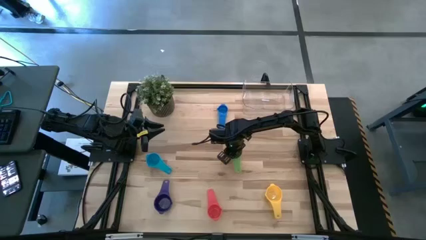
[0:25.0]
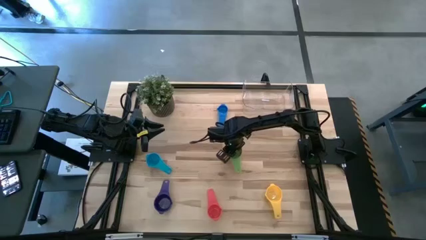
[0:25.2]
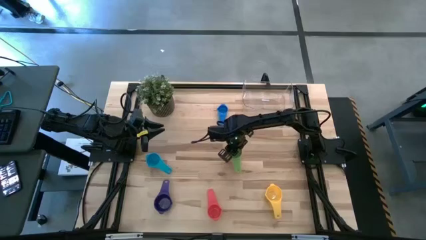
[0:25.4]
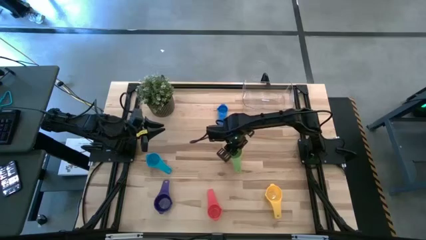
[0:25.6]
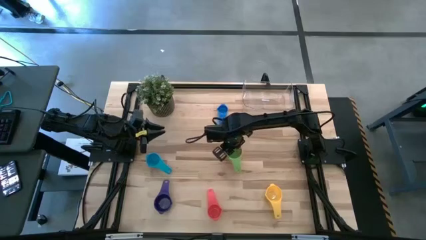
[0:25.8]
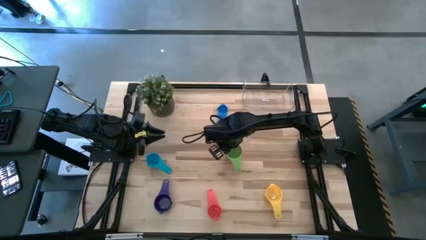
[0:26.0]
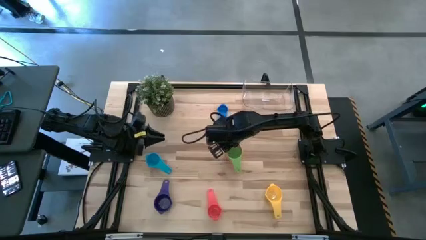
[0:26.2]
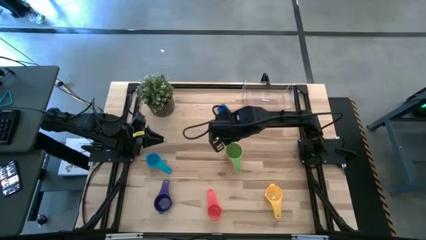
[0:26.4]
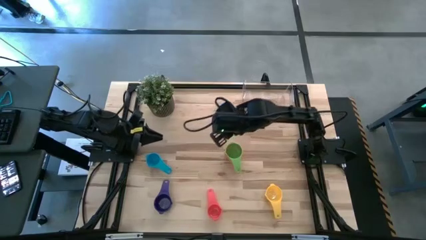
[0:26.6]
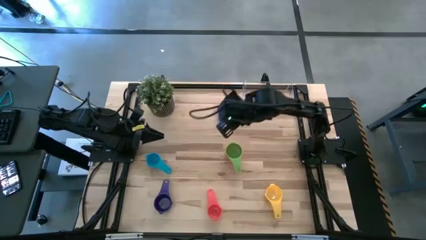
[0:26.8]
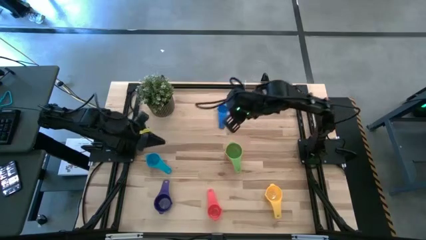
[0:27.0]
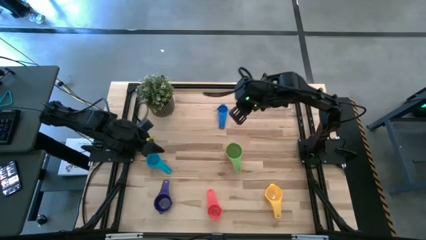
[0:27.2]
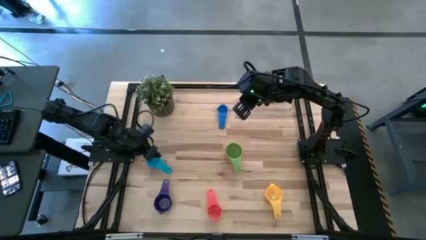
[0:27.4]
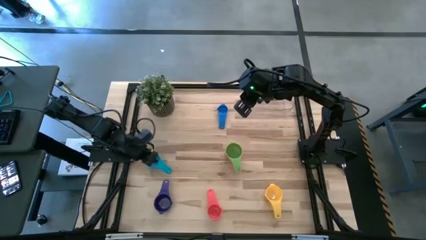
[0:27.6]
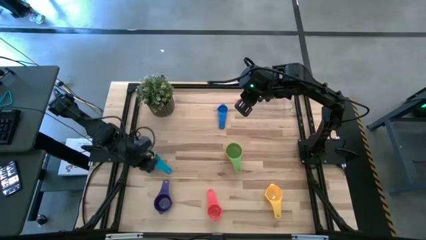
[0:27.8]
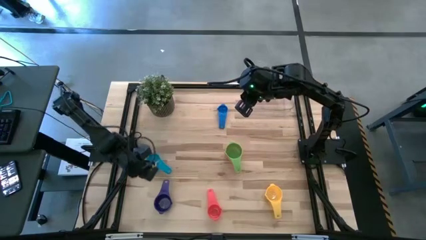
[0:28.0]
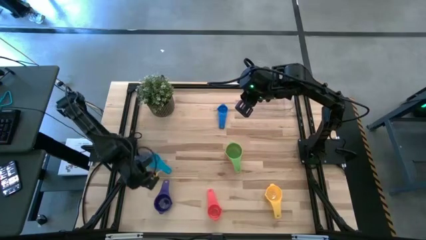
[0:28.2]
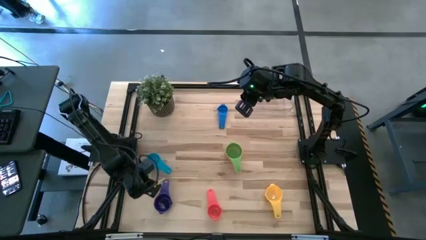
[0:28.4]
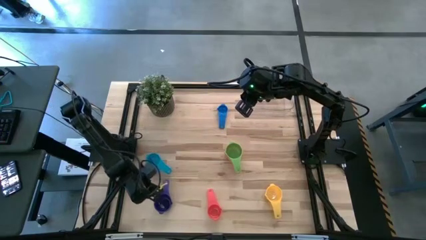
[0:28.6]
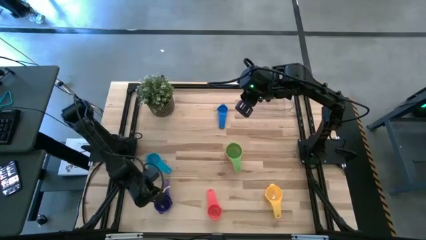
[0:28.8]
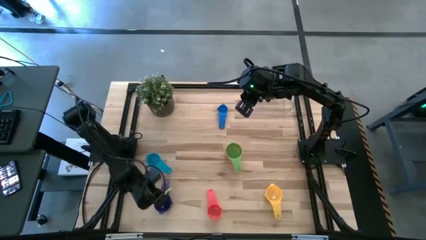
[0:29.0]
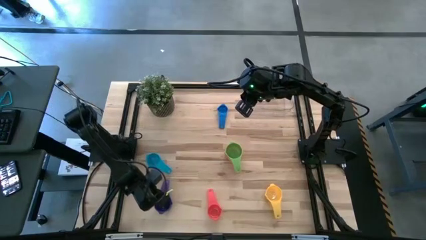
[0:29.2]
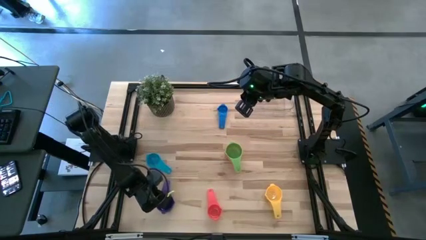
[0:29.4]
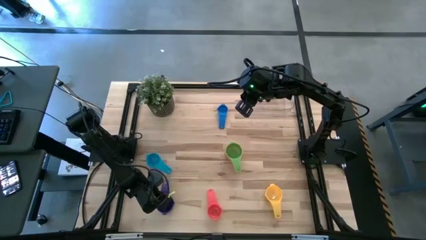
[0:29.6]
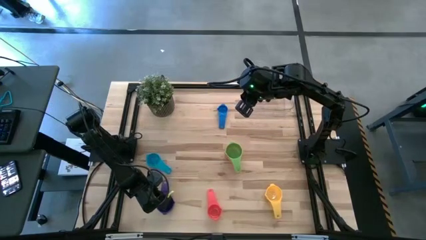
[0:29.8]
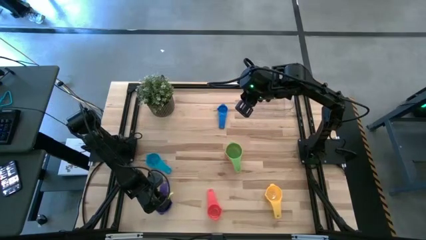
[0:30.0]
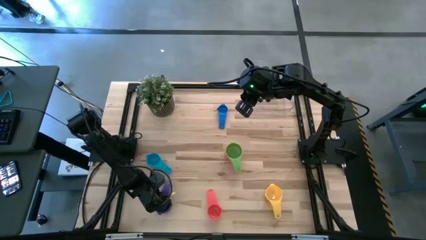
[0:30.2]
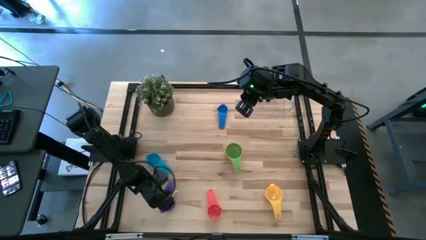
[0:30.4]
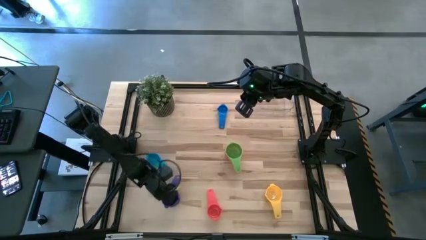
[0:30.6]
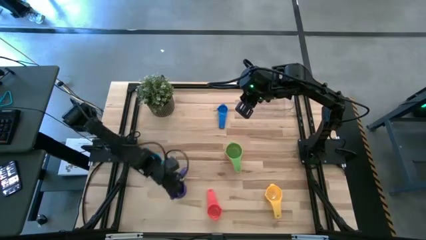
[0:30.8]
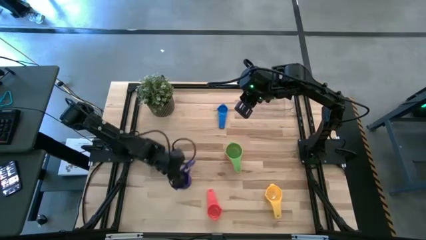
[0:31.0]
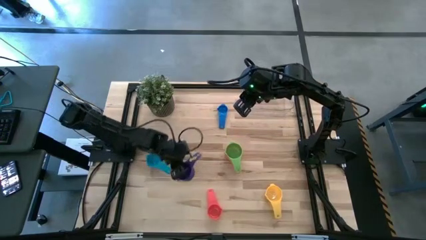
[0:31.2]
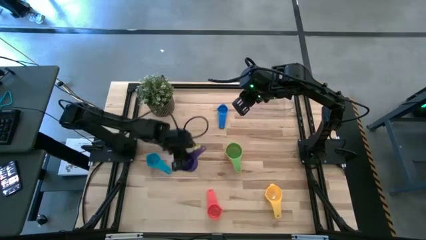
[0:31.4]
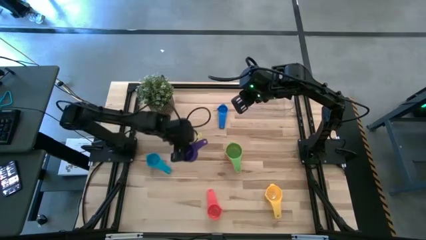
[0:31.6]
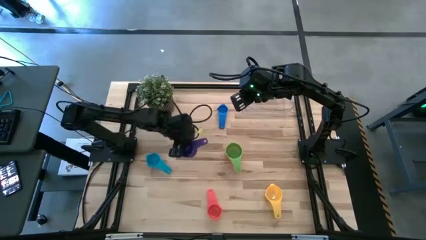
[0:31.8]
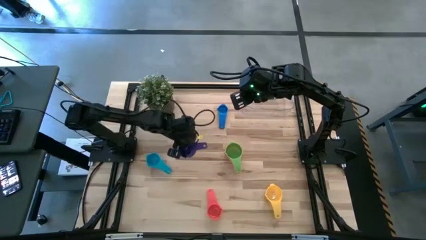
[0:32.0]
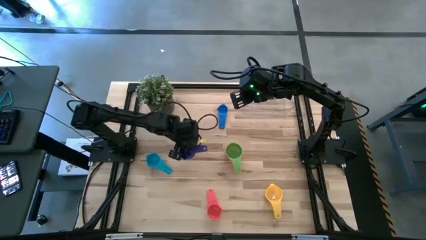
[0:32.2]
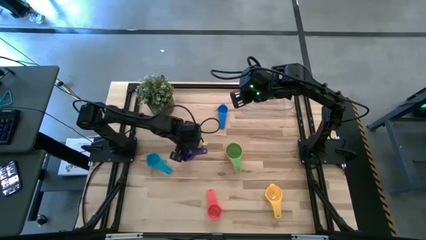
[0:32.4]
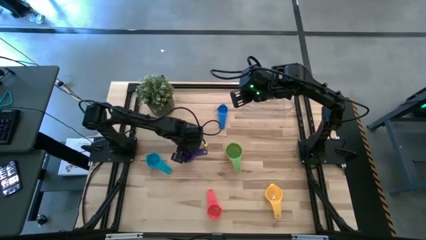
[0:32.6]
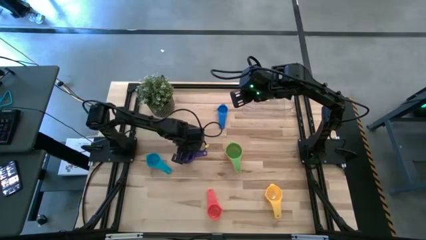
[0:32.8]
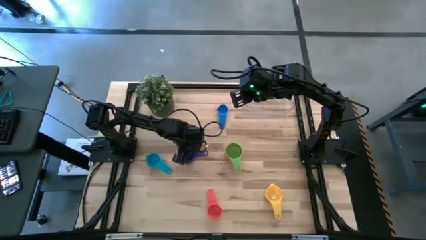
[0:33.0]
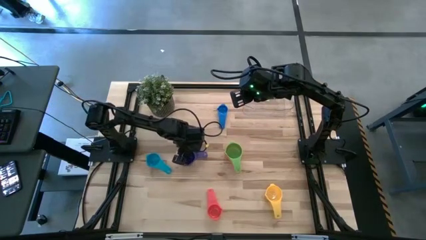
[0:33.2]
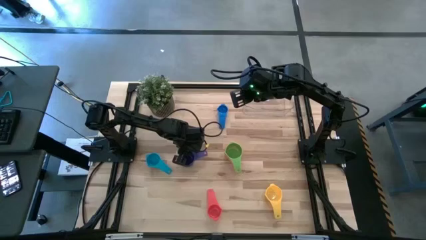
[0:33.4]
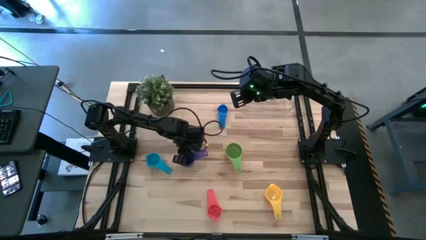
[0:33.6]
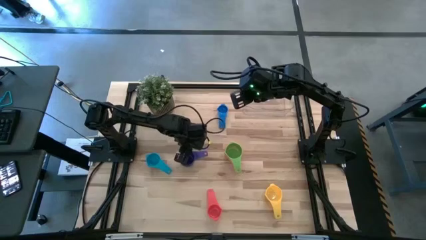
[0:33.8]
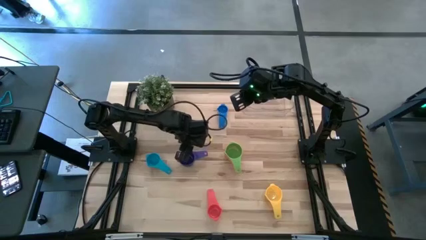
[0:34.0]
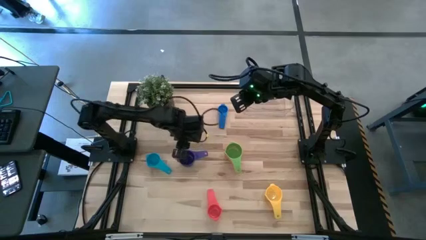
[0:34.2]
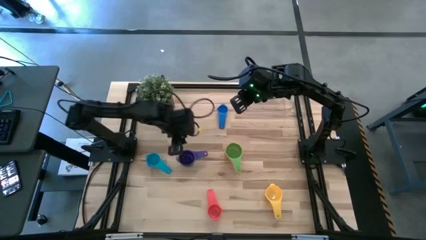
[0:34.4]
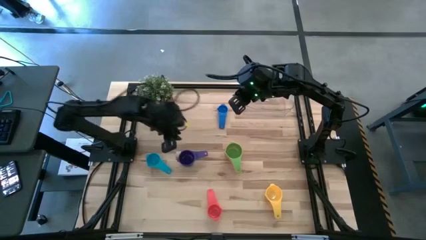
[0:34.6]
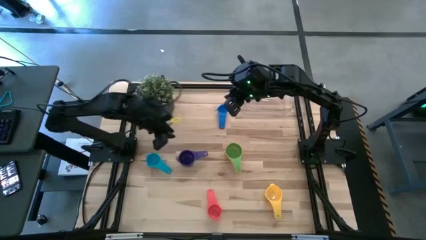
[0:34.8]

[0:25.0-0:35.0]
Task: Nest measuring cups in basket
Stack the dark blue measuring cup on top of the green measuring cup

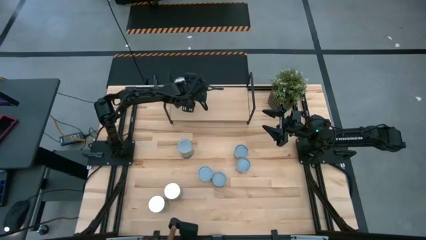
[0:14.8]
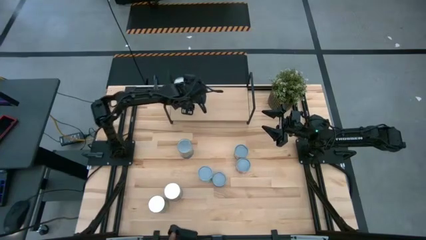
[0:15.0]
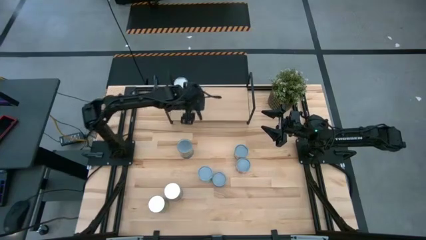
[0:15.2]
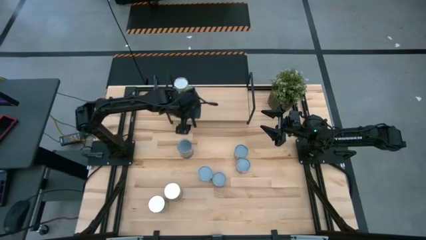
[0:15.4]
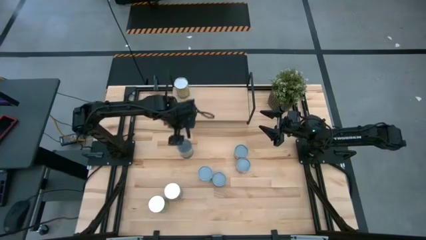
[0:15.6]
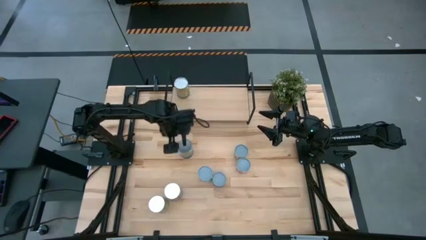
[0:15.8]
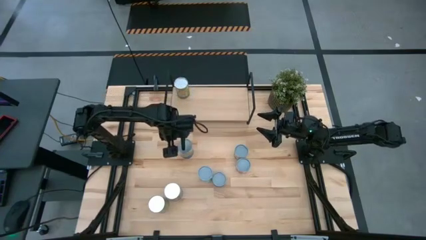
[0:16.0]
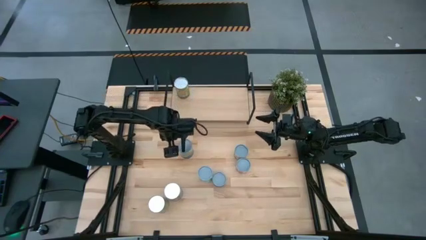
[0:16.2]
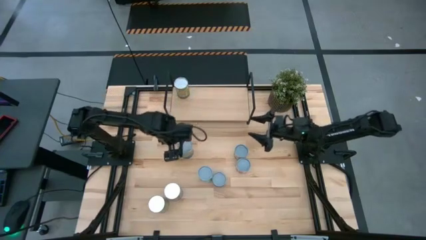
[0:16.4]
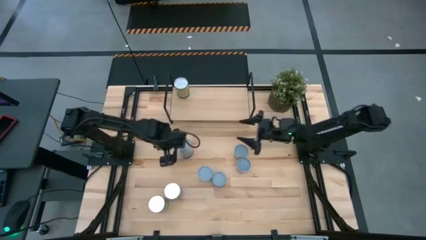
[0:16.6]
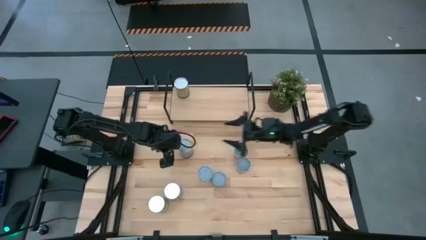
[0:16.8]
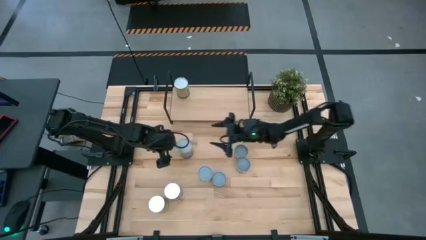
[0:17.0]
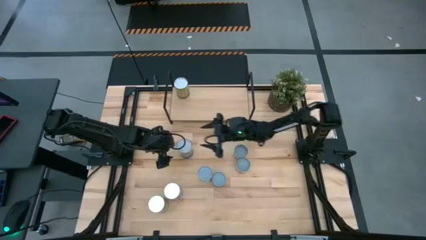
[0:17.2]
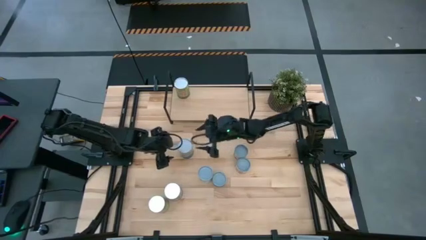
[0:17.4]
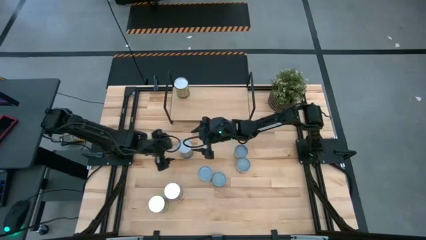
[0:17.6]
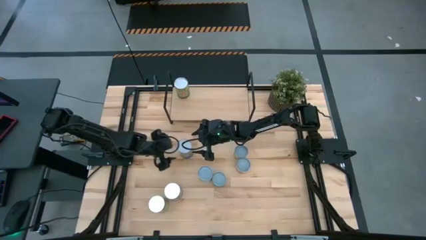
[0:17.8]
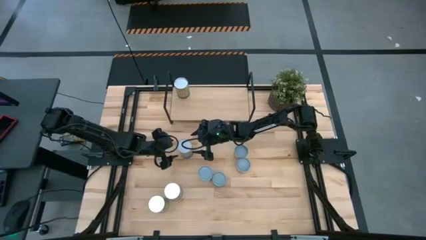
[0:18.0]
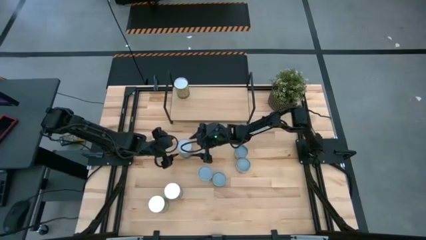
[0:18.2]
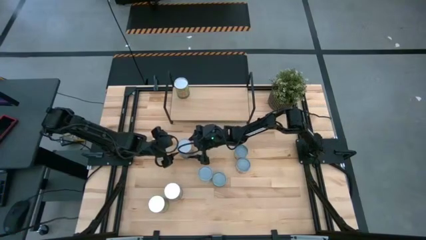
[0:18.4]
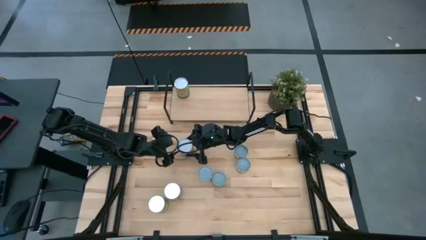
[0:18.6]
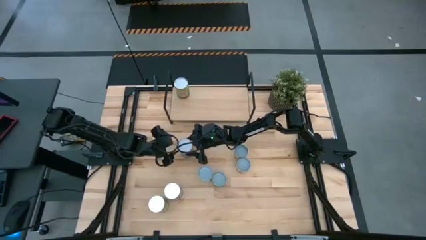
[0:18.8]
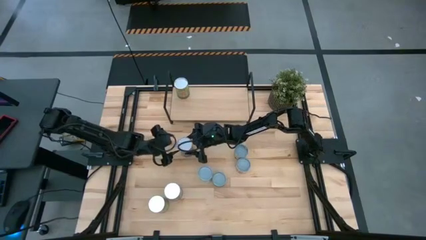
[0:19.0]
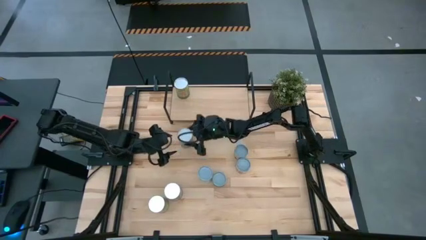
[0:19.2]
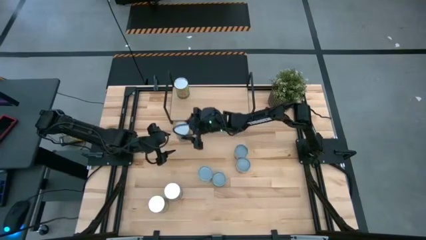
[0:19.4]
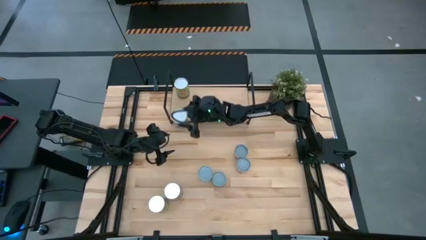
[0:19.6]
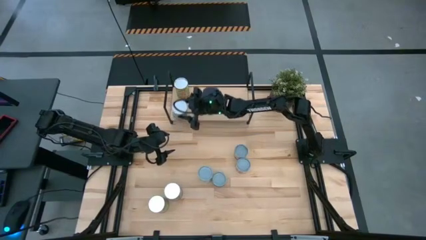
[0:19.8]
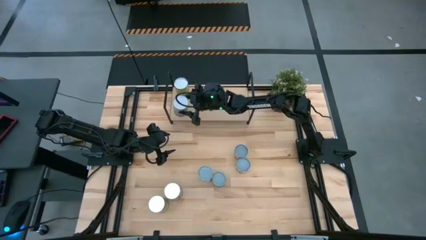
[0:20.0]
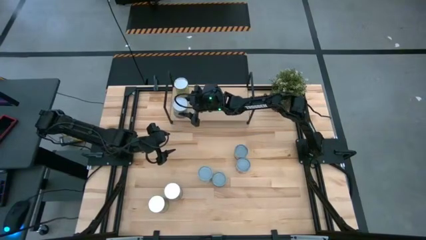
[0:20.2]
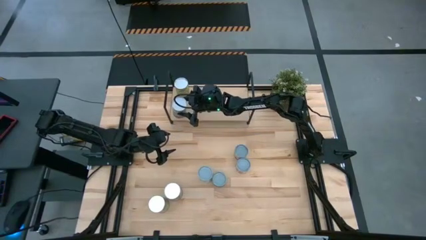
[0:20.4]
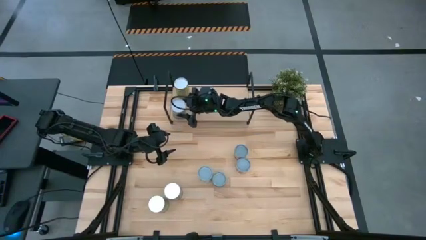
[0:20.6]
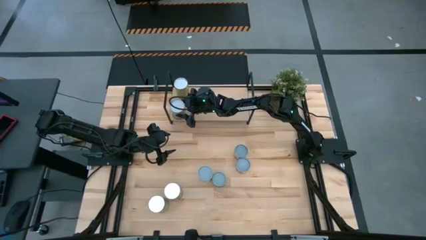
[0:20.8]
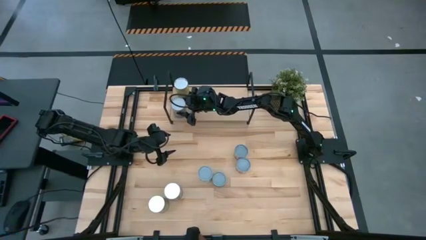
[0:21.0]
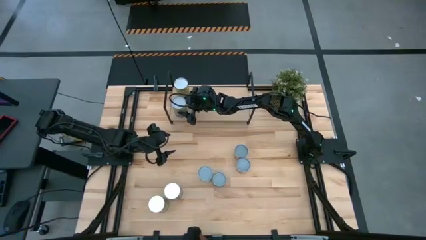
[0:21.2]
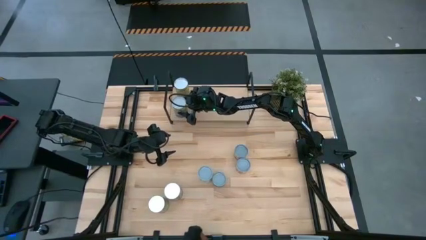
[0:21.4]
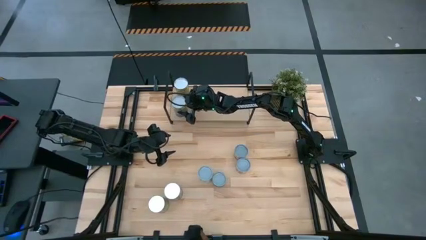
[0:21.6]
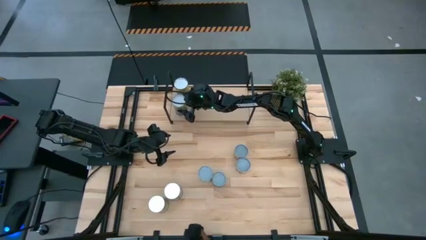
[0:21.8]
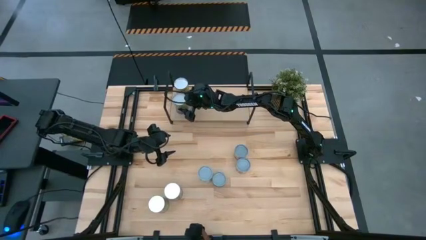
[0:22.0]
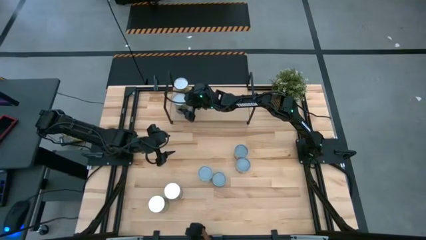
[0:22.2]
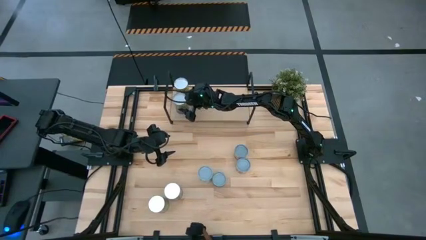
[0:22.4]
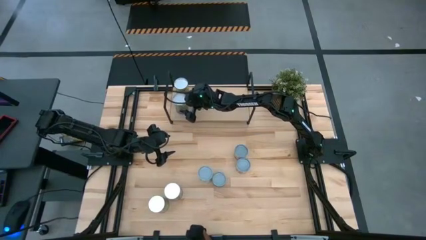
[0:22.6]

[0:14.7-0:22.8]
Task: Pick and place cans onto a shelf
Put the canned peas on the shelf
